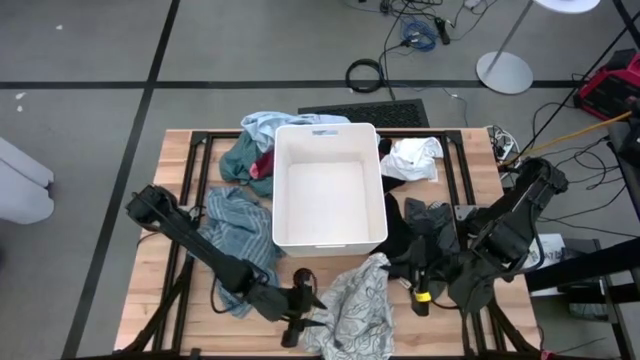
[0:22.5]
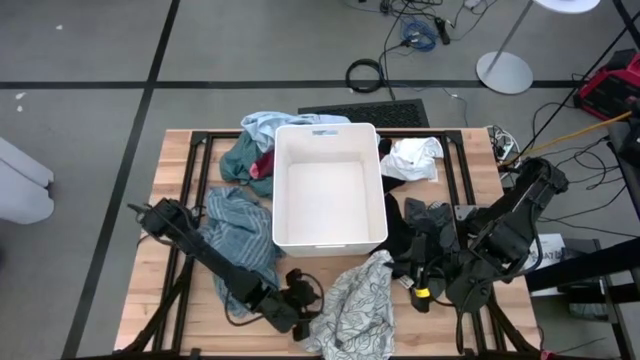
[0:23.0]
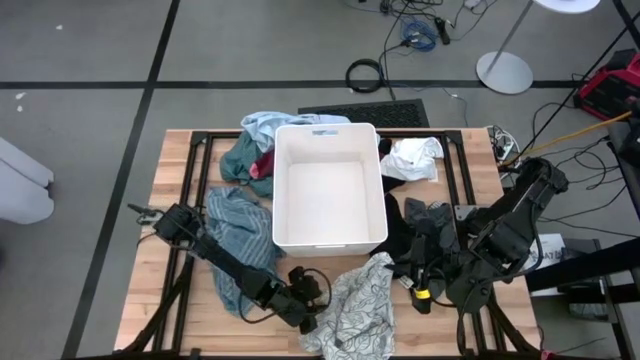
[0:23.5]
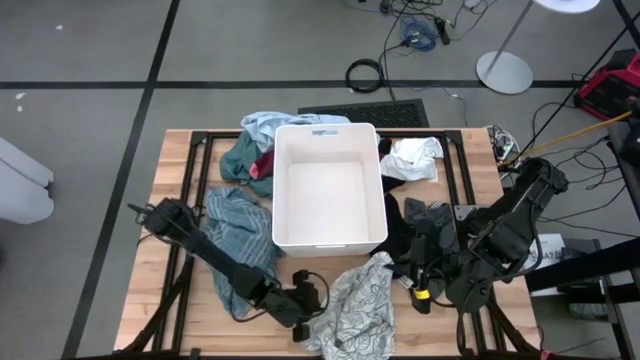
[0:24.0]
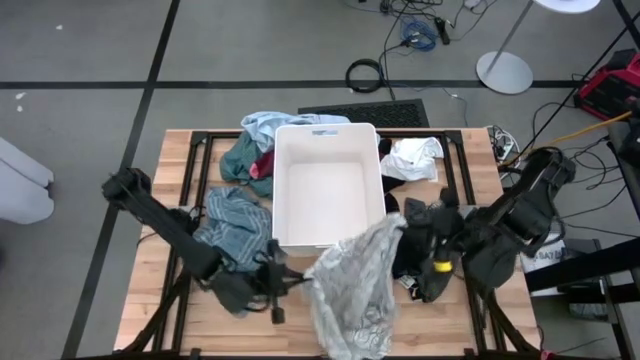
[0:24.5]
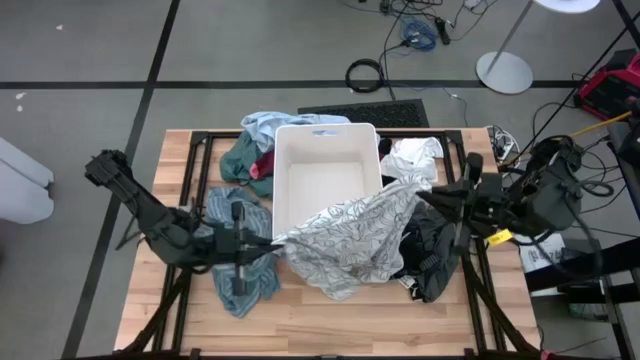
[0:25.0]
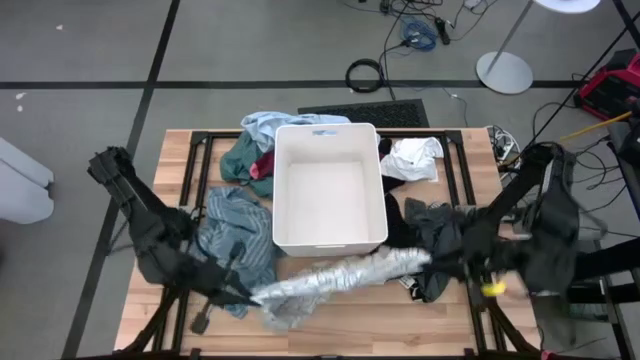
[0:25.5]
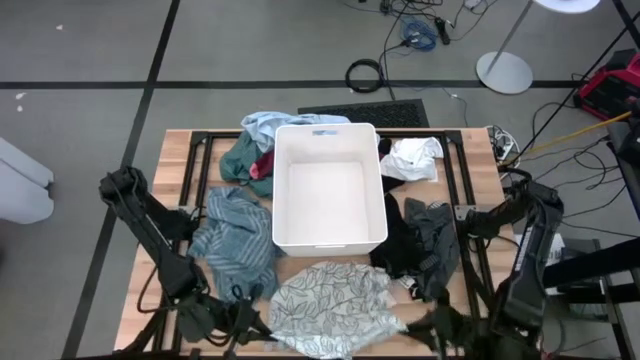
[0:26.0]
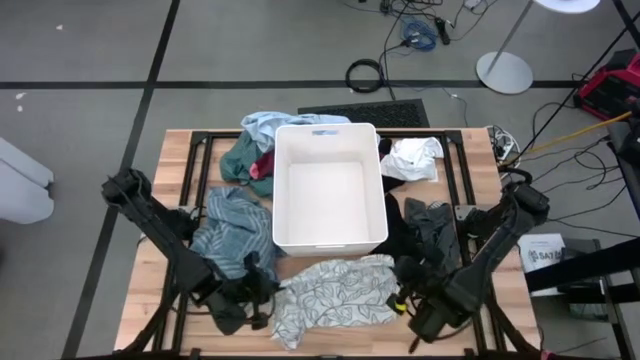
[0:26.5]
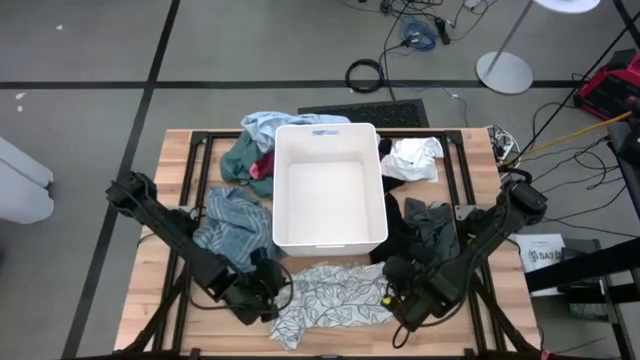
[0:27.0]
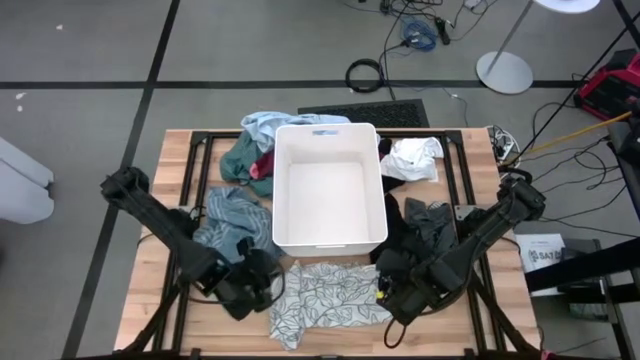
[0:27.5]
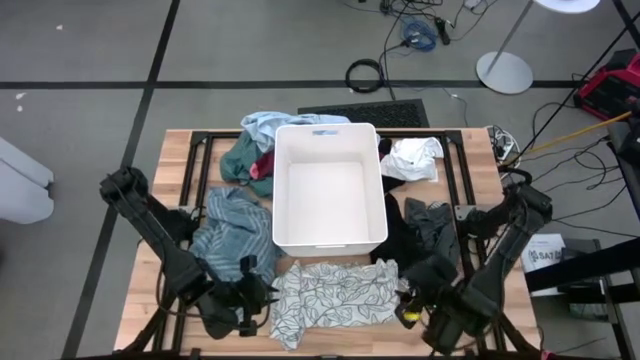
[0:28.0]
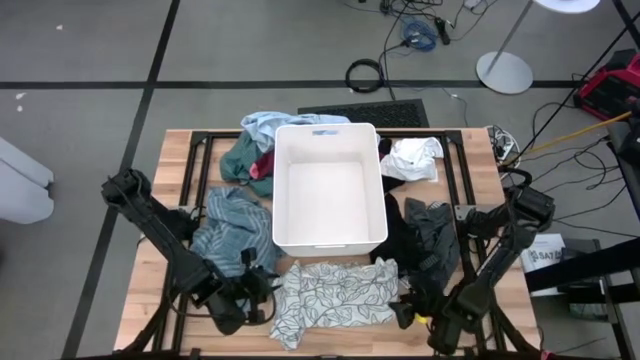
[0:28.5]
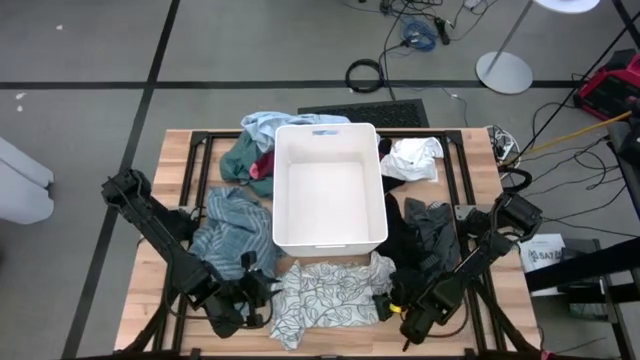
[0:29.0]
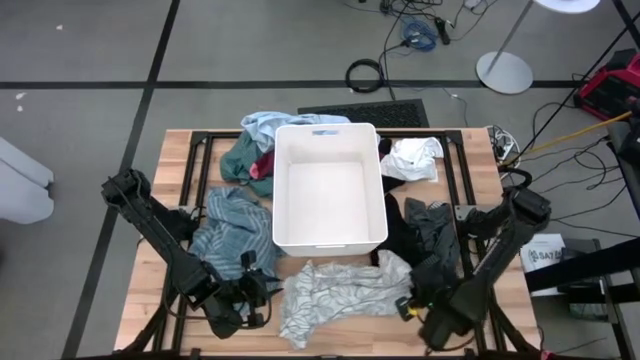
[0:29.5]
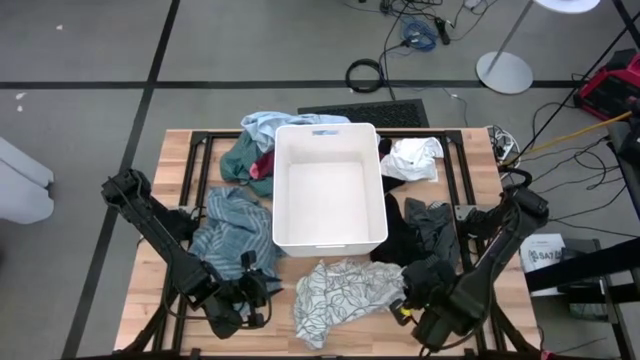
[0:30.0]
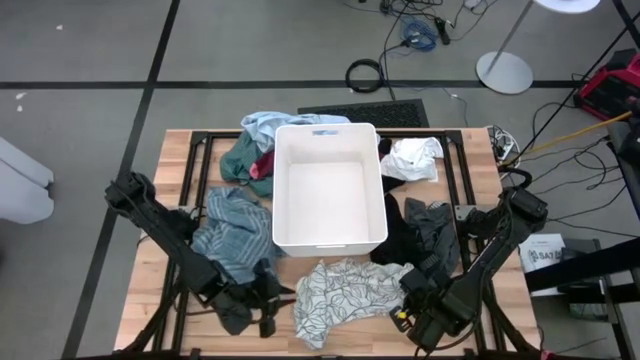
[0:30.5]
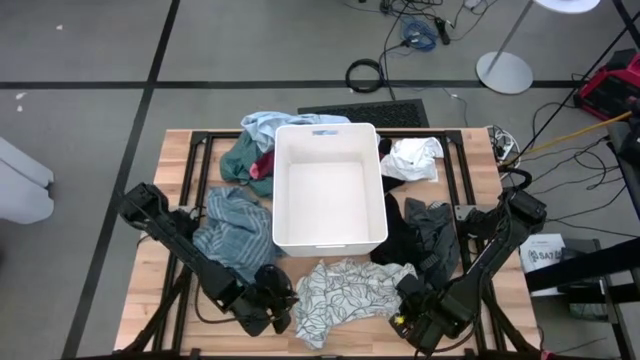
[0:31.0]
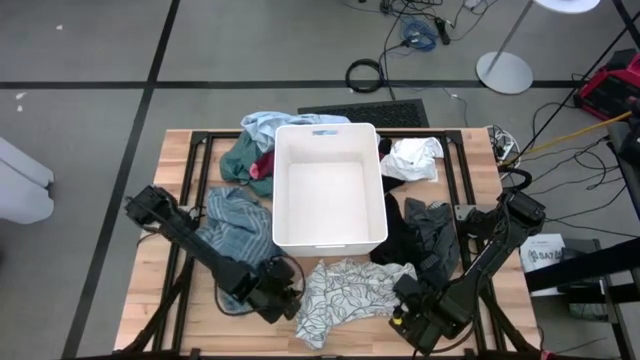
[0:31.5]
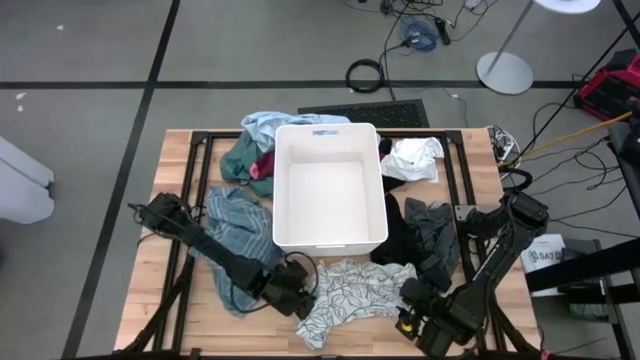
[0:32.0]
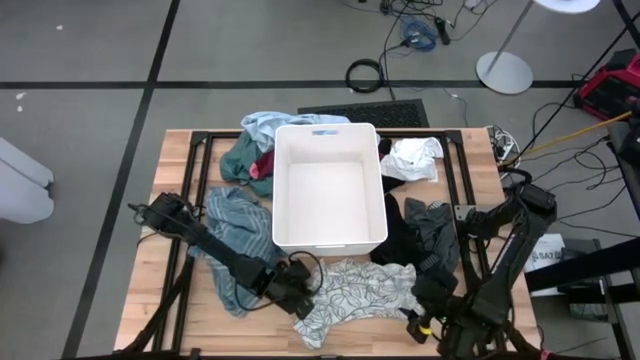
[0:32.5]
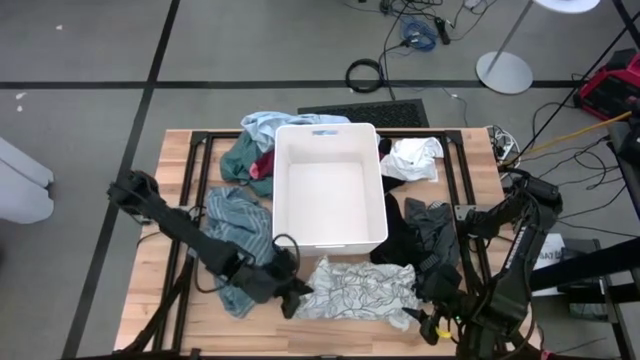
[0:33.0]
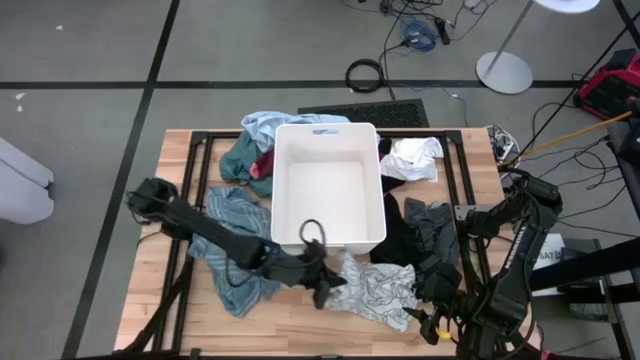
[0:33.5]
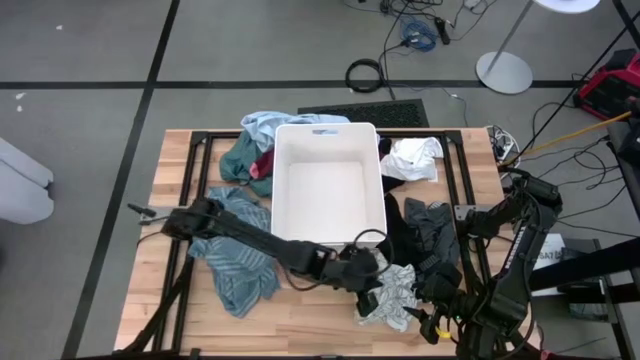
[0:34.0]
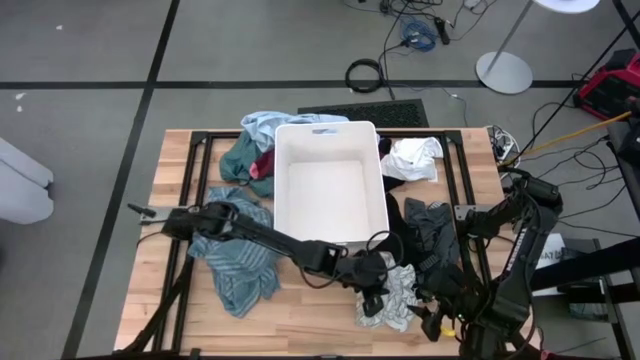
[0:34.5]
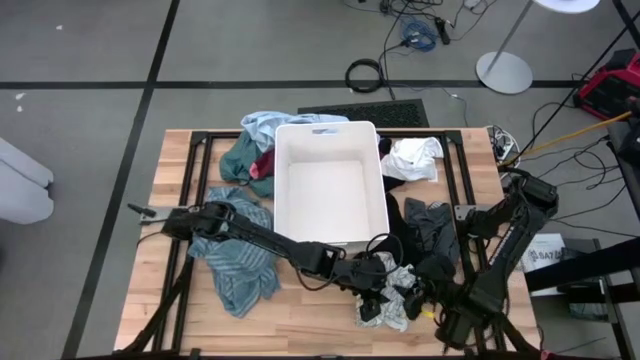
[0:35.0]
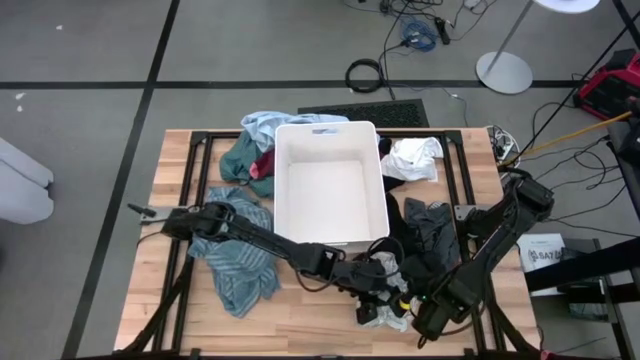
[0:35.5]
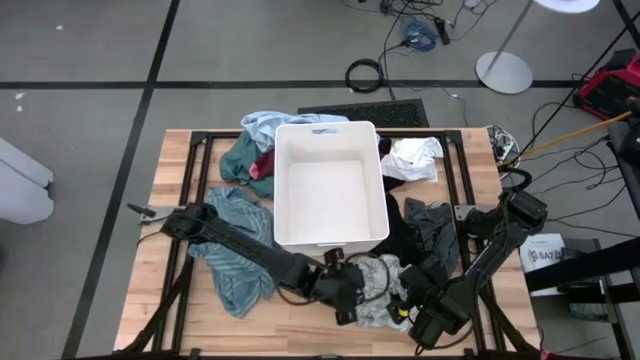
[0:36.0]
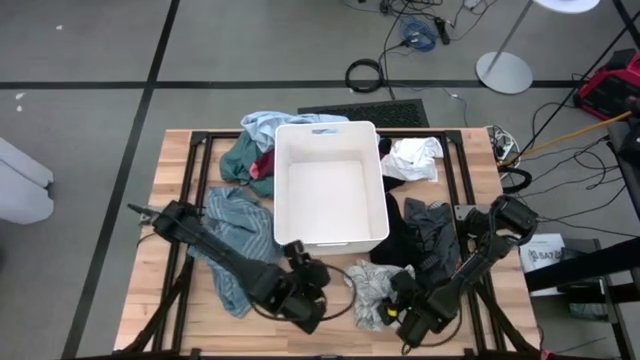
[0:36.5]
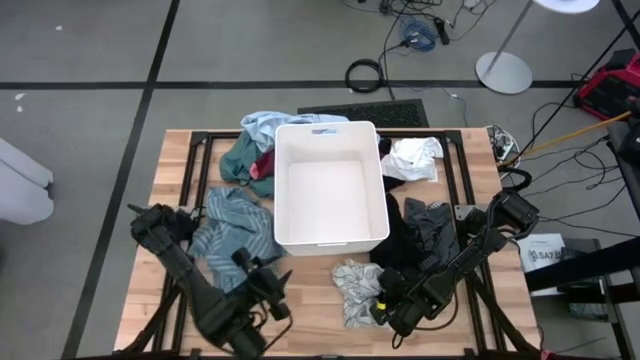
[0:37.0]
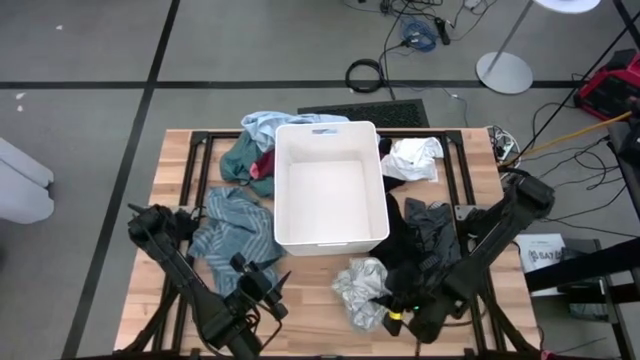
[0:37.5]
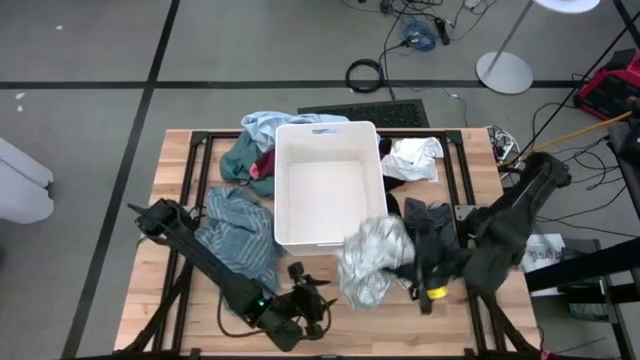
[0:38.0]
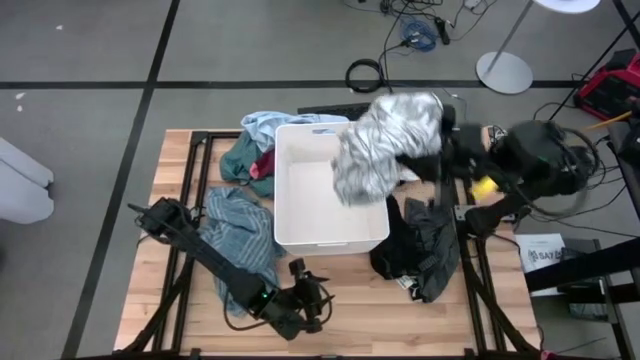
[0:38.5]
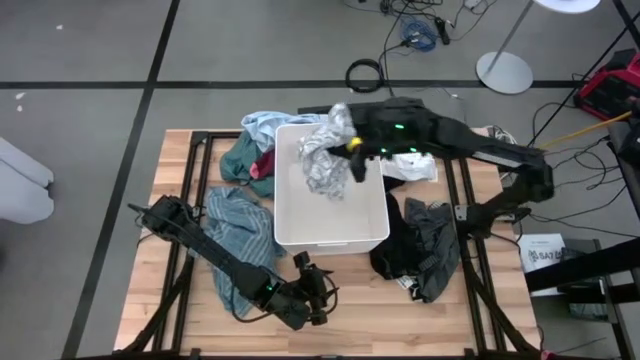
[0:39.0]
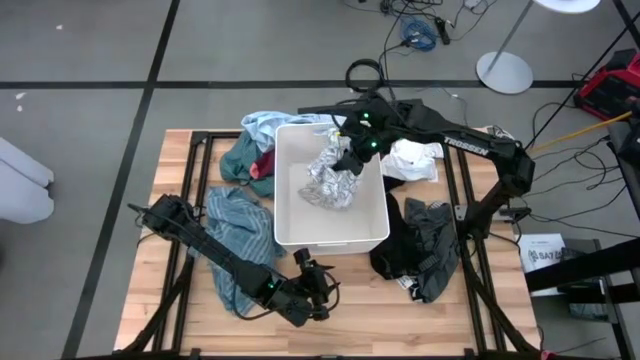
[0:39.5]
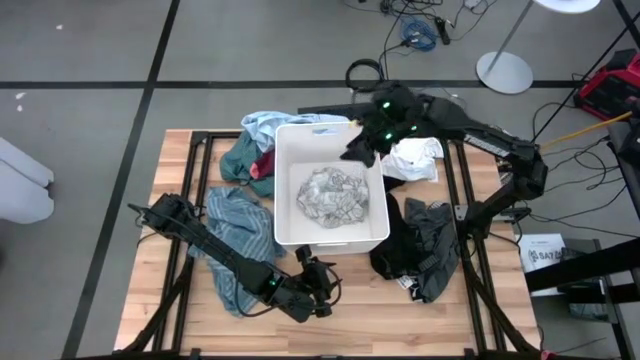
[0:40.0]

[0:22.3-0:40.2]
Task: Sort clothes
Put the white and black towel into the white laundry organizer

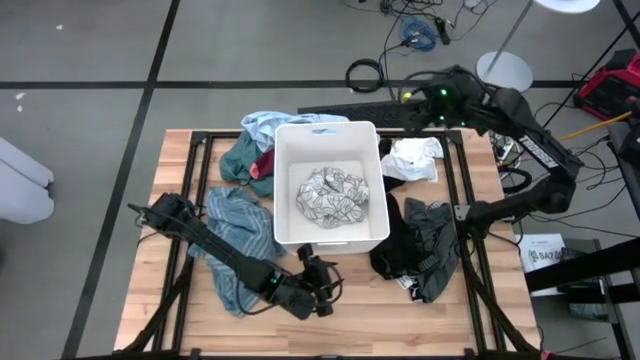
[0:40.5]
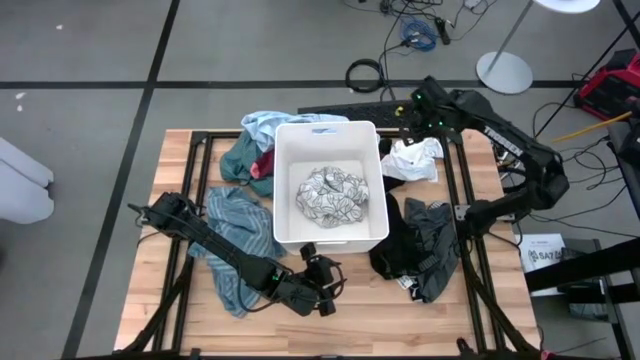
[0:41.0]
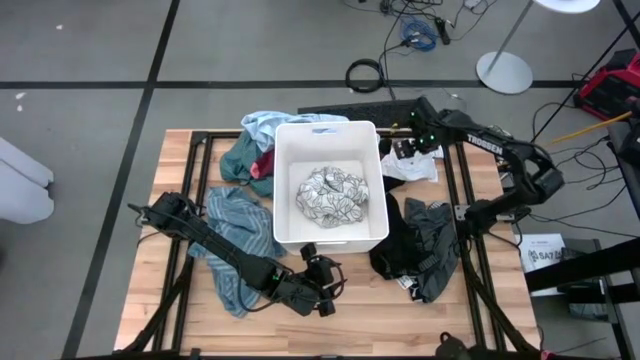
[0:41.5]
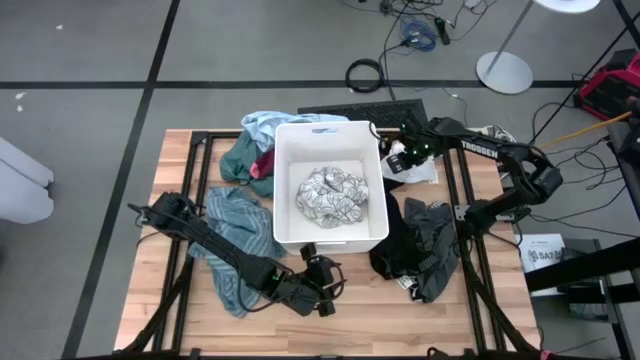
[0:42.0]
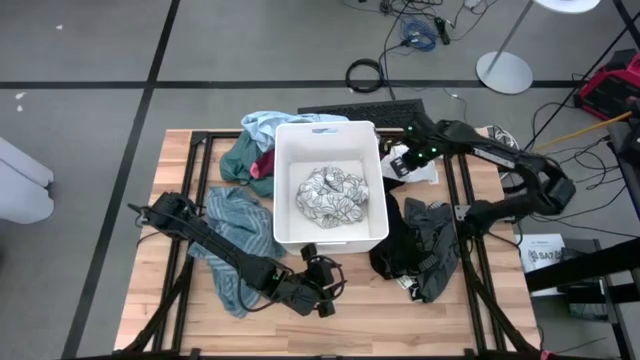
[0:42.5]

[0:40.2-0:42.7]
Put the right white sock into the white laundry organizer
